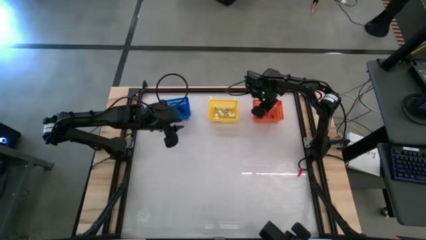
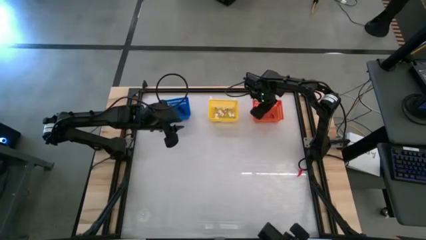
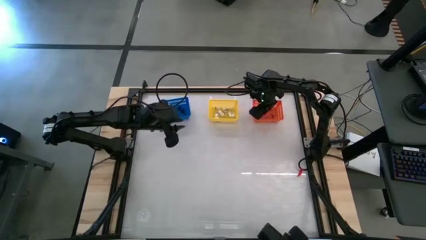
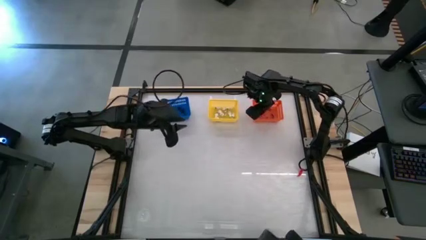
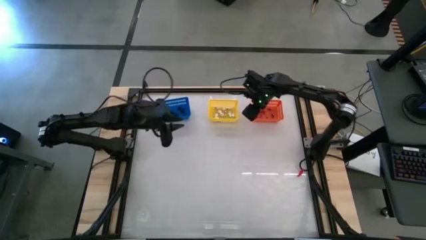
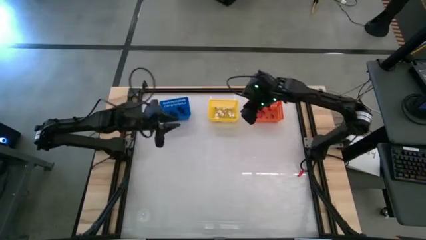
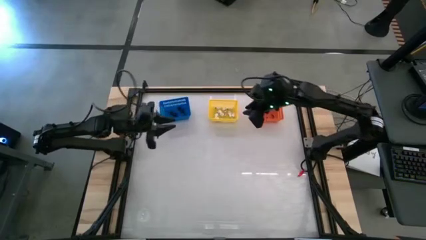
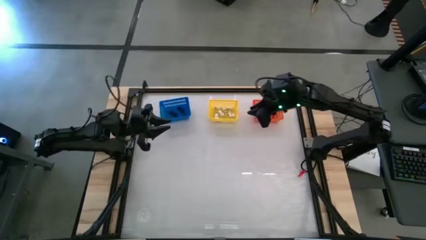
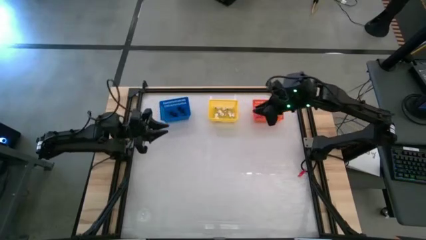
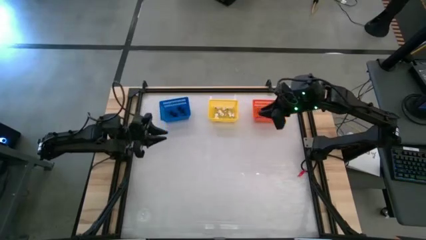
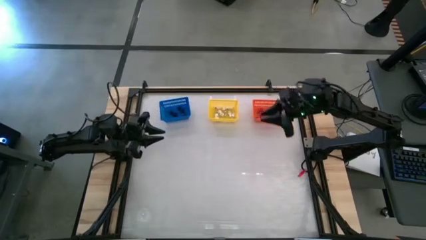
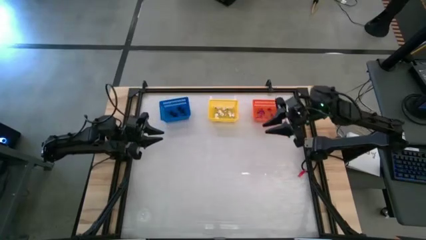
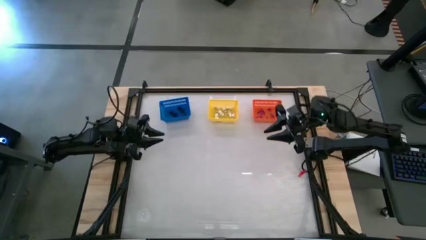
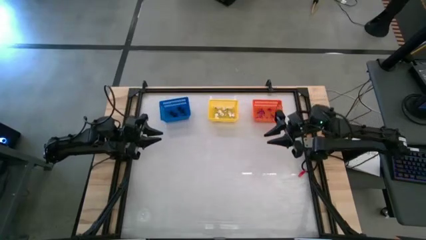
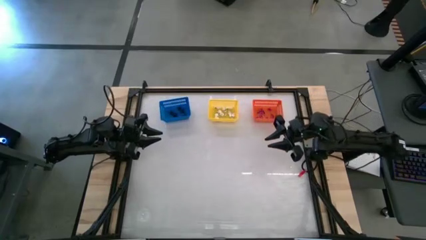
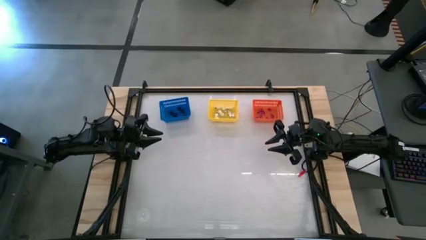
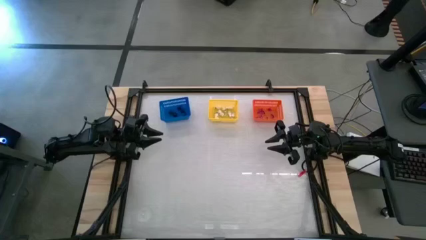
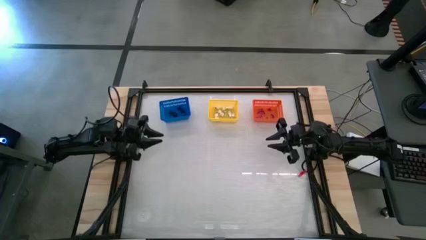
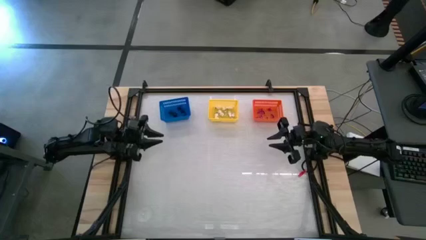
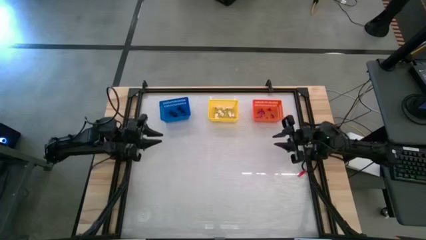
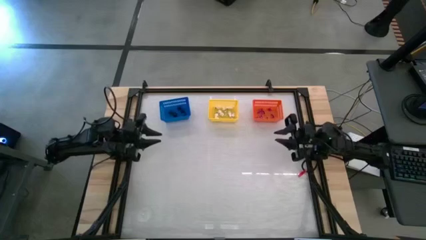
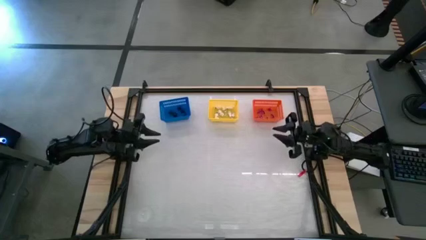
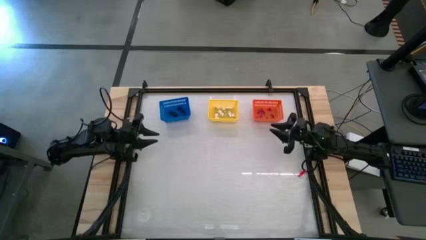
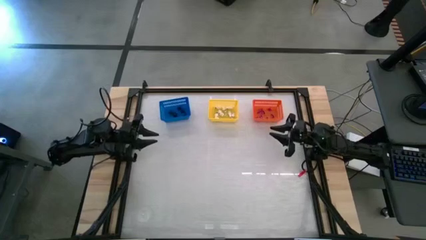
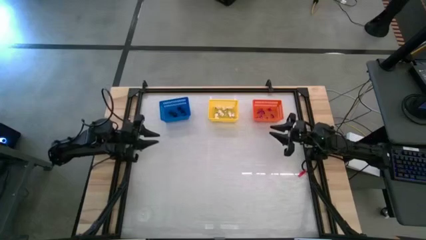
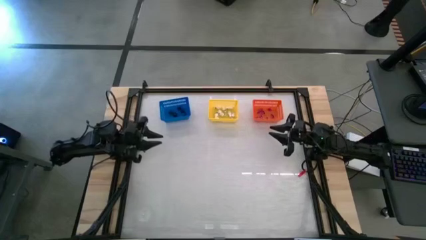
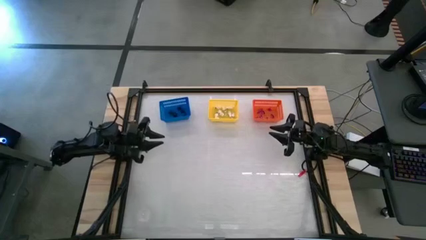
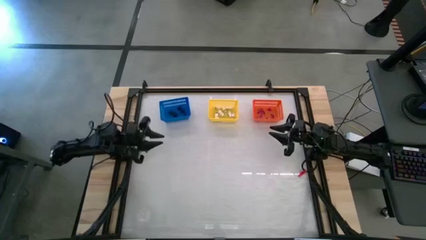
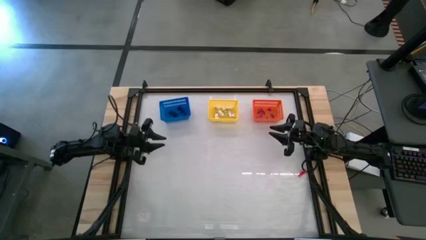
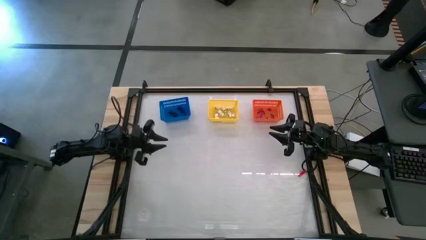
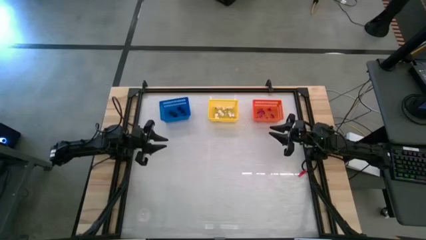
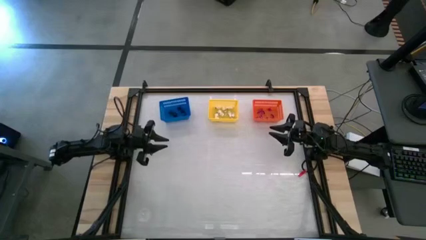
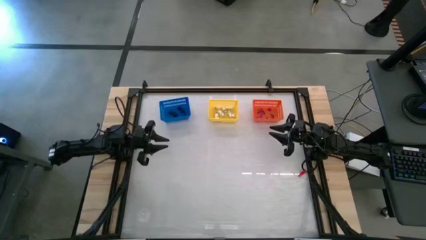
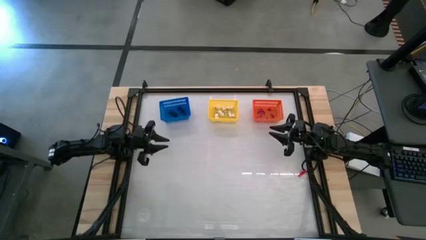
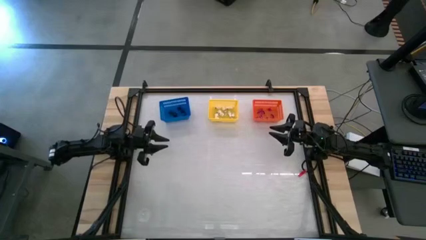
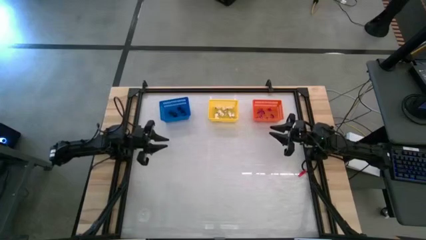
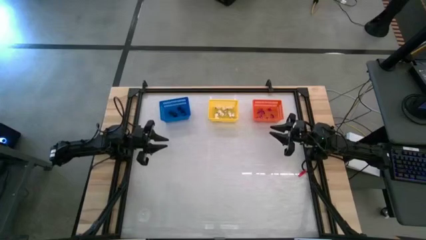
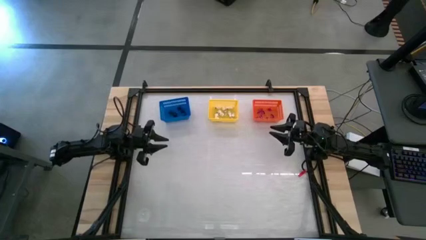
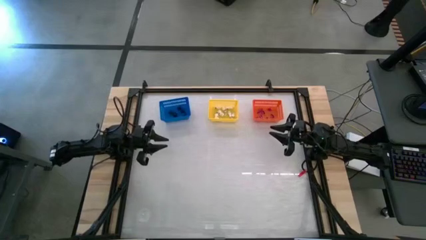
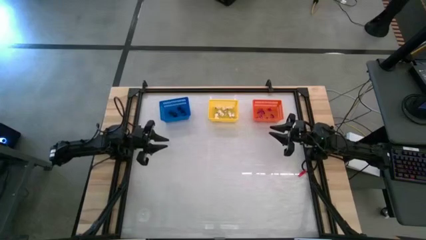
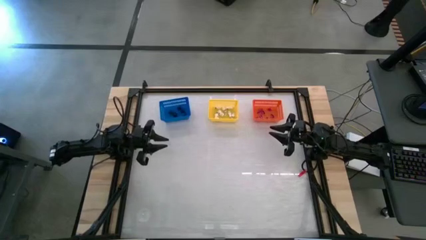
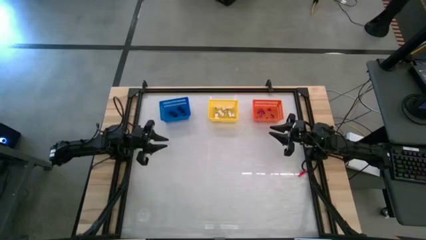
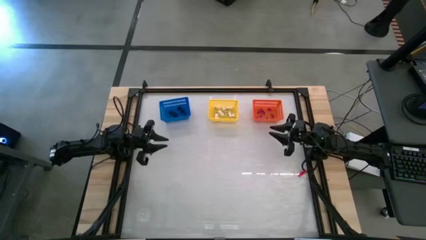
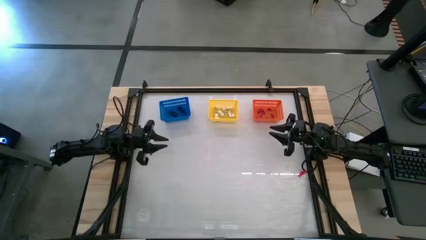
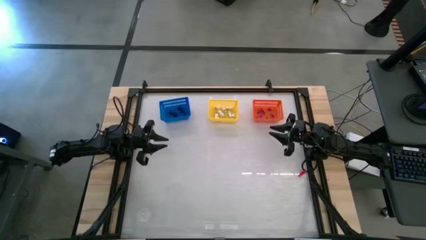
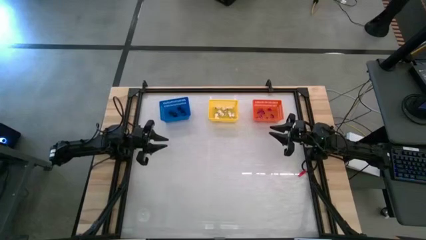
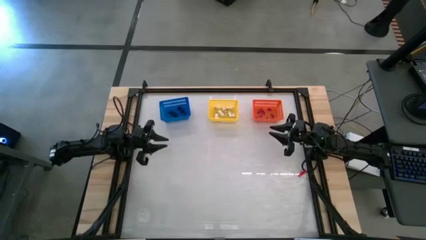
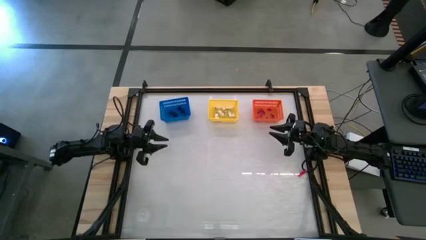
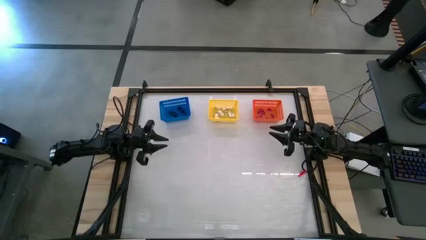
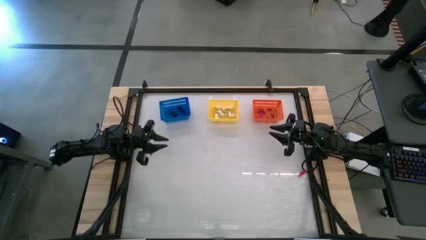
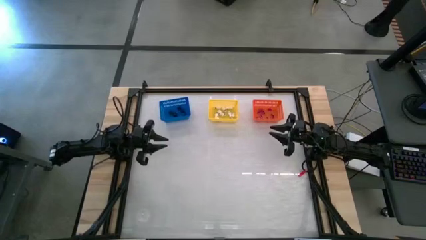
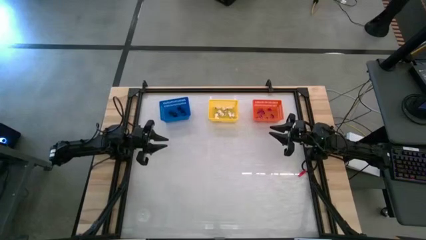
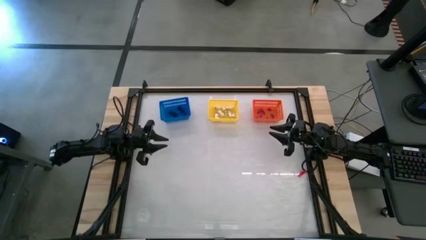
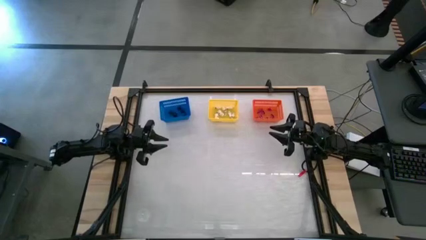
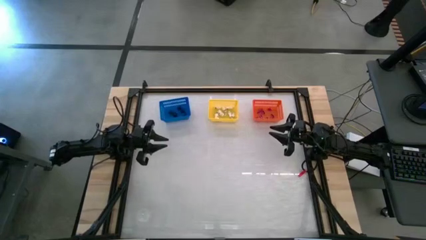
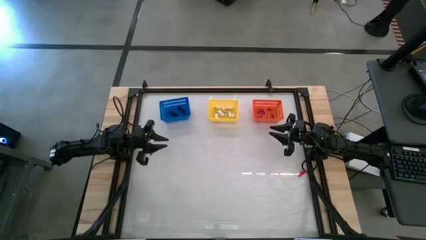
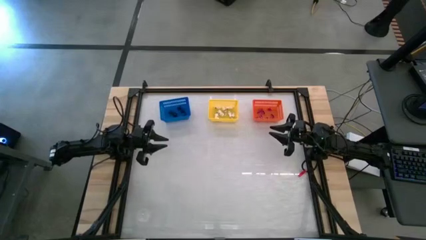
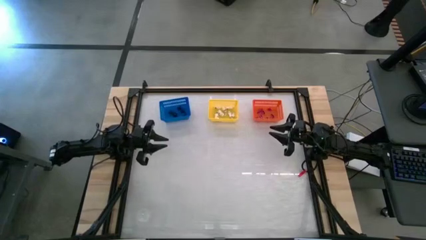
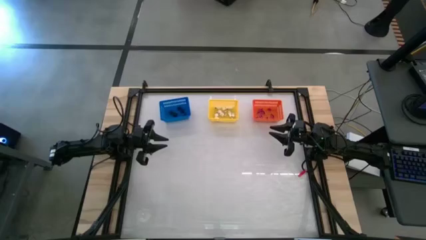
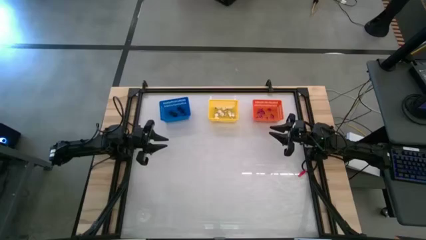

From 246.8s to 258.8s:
Task: Sort Halloween decoration
Return to Home Position

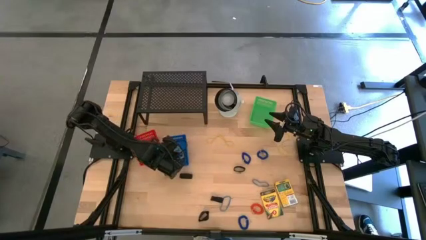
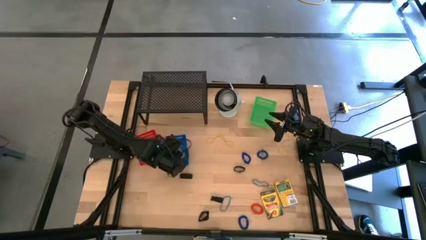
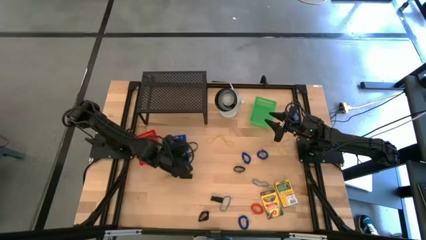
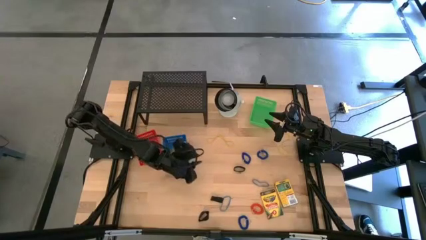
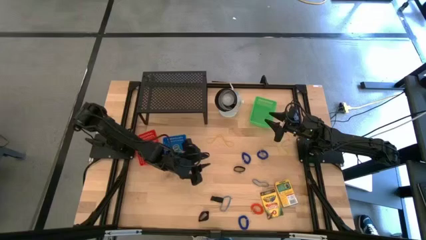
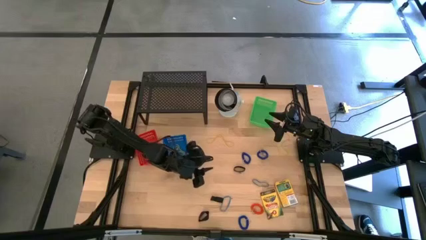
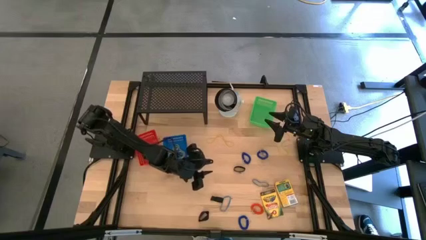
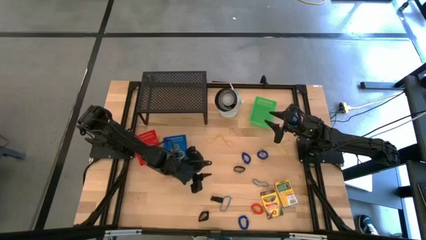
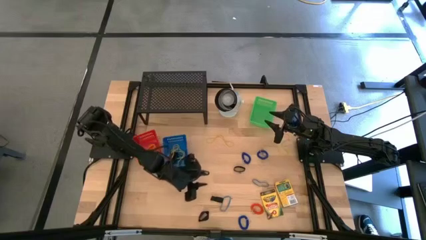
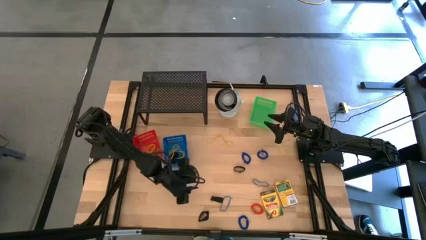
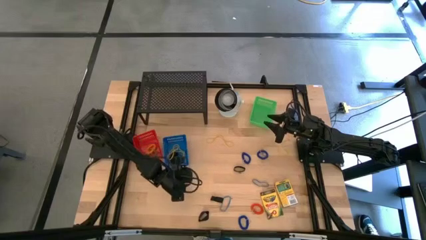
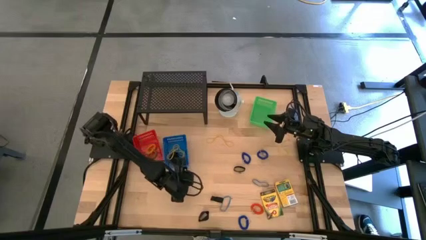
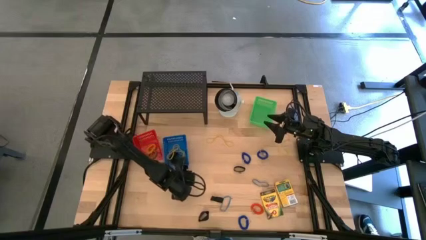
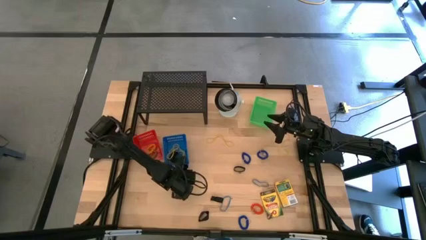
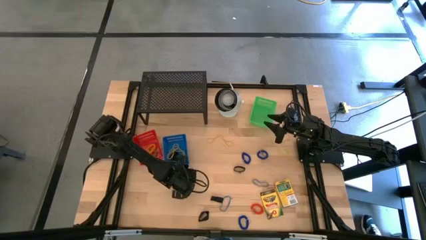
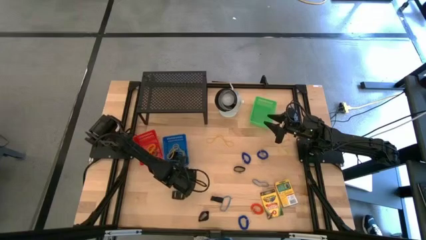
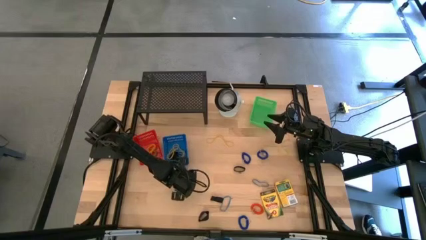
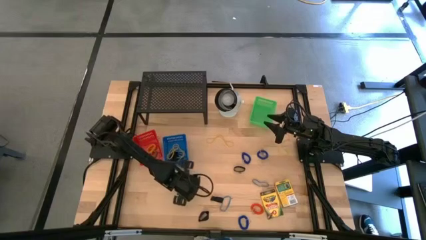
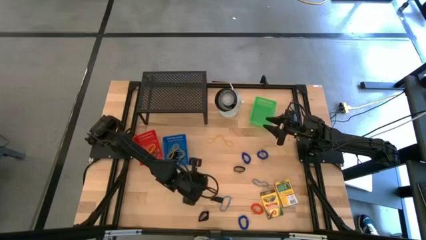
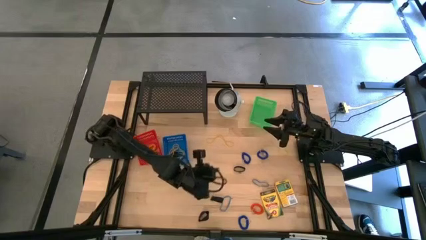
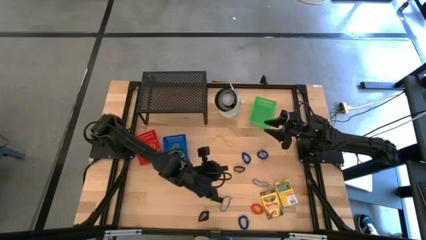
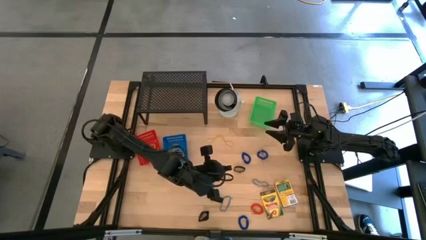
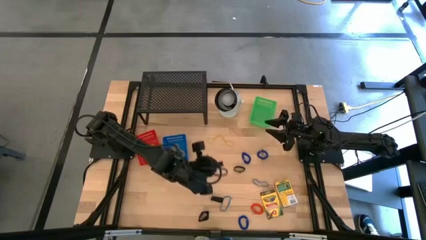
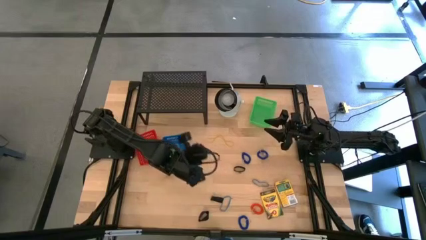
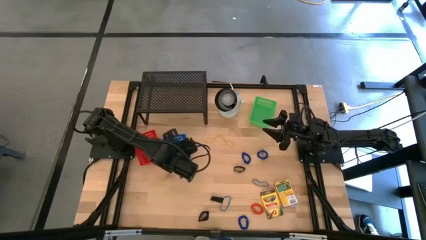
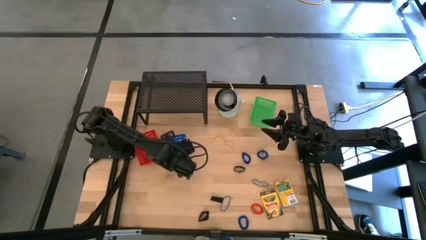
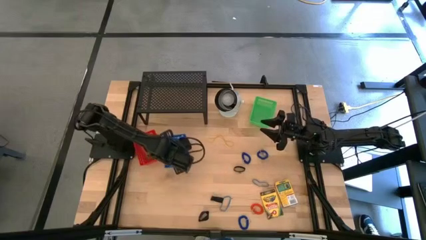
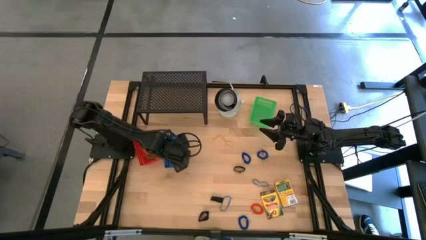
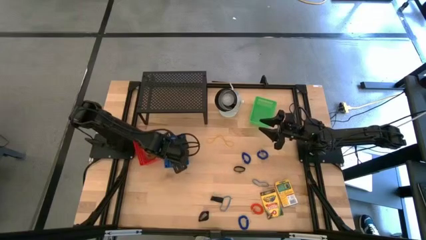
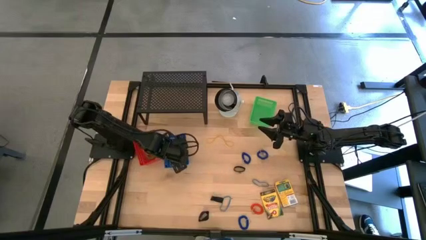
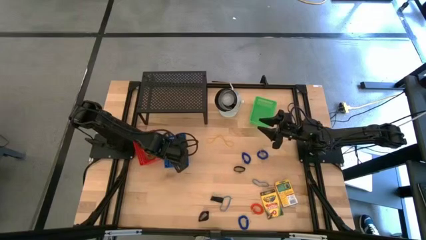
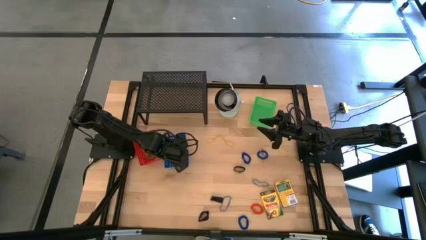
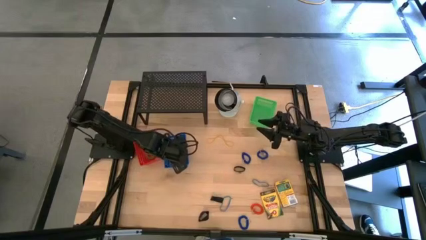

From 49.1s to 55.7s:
Task: Pick & Place Office Desk Supplies
Put the black rubber band into the blue bin
